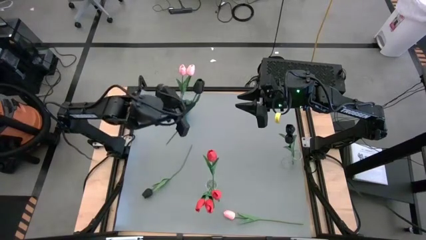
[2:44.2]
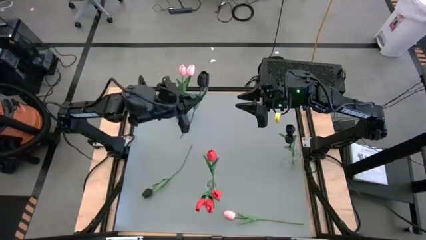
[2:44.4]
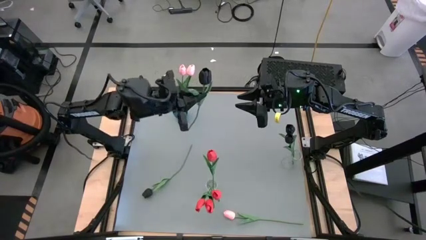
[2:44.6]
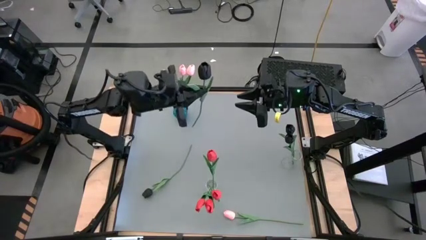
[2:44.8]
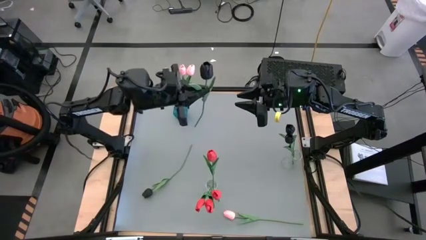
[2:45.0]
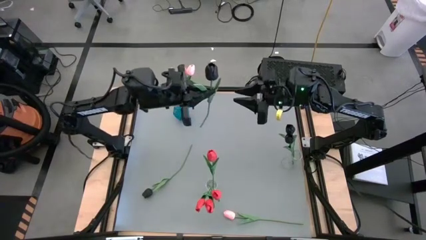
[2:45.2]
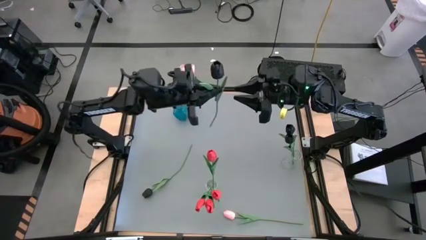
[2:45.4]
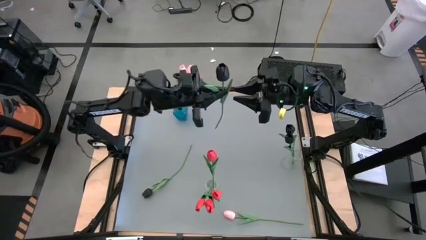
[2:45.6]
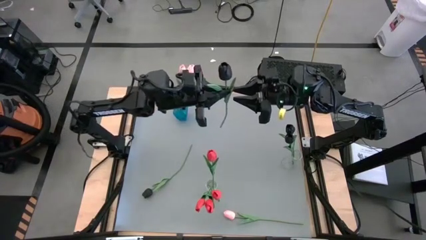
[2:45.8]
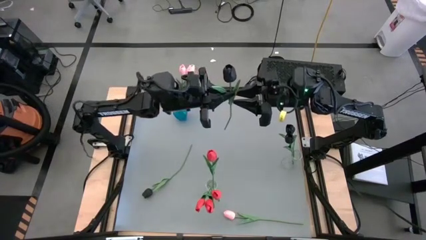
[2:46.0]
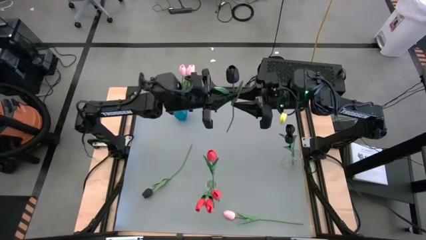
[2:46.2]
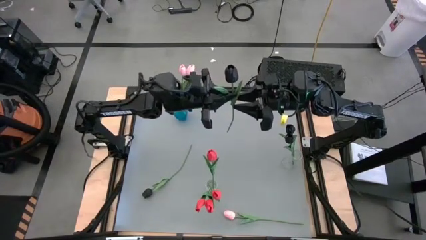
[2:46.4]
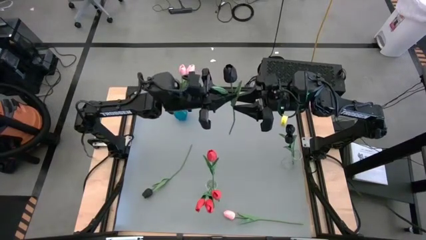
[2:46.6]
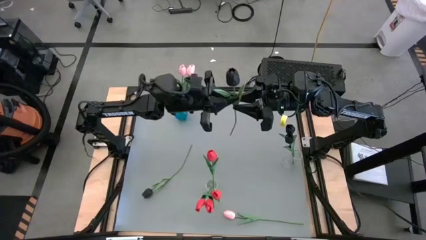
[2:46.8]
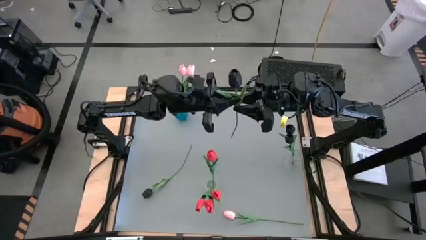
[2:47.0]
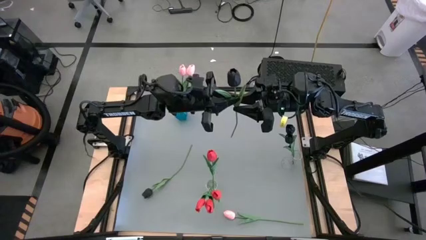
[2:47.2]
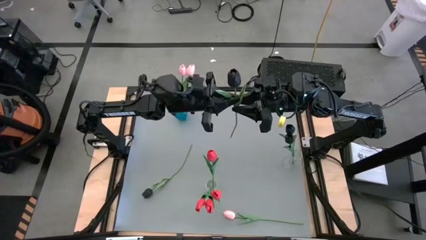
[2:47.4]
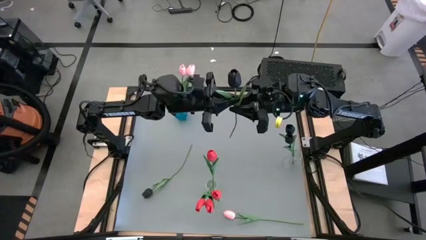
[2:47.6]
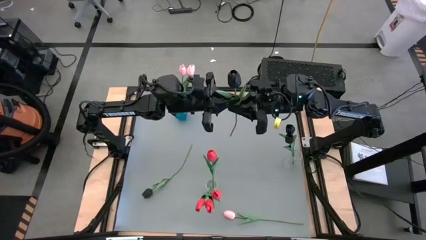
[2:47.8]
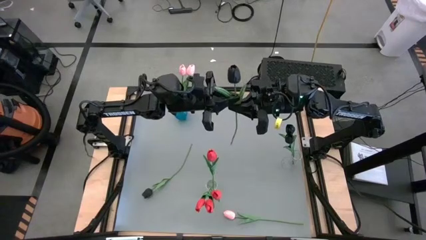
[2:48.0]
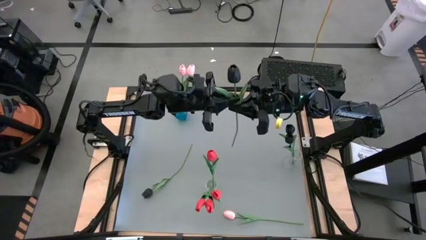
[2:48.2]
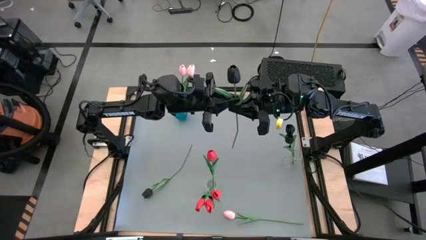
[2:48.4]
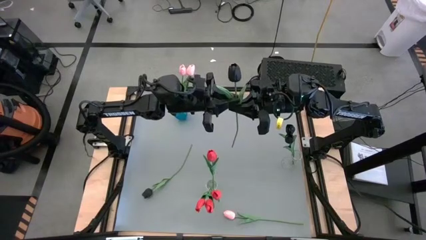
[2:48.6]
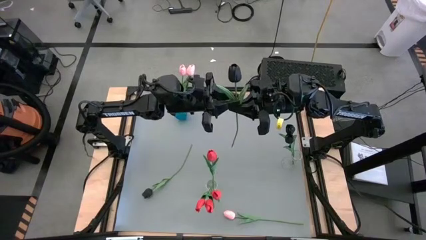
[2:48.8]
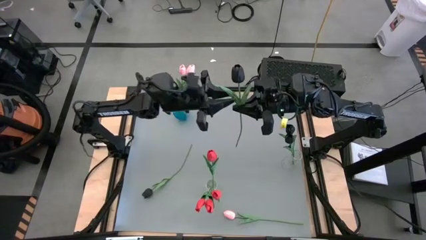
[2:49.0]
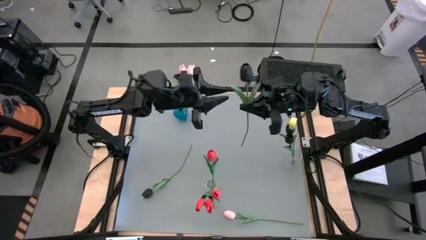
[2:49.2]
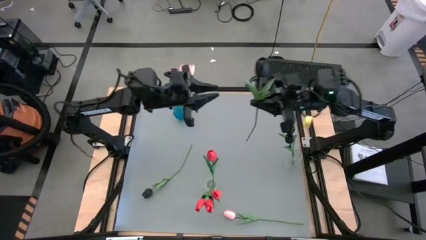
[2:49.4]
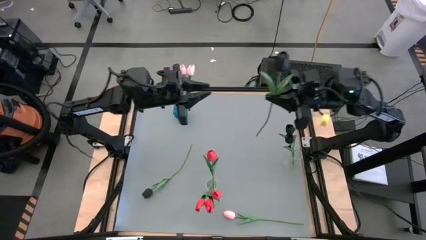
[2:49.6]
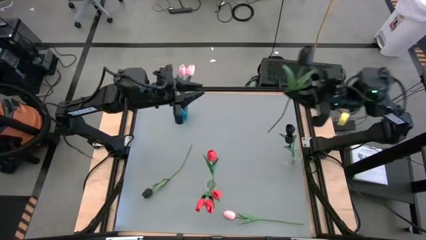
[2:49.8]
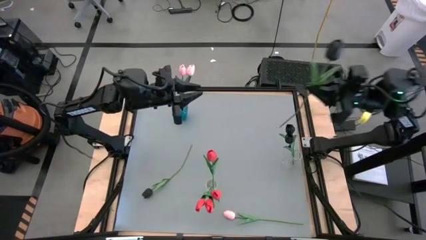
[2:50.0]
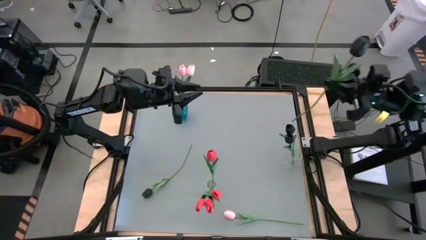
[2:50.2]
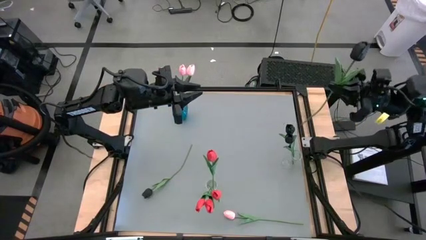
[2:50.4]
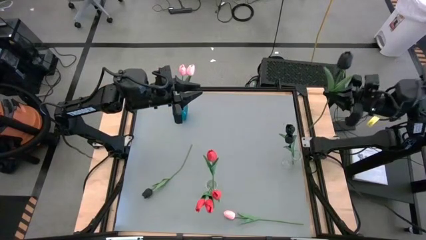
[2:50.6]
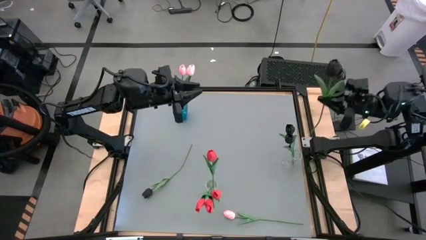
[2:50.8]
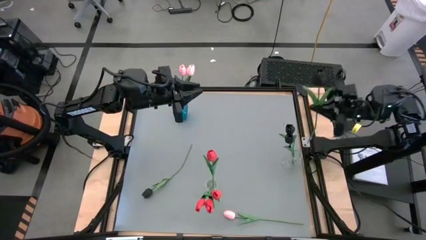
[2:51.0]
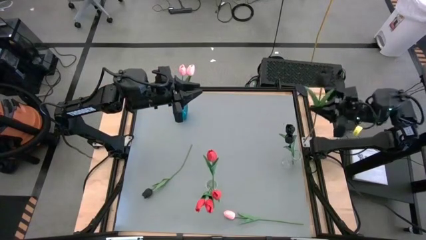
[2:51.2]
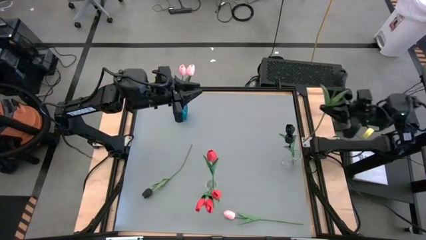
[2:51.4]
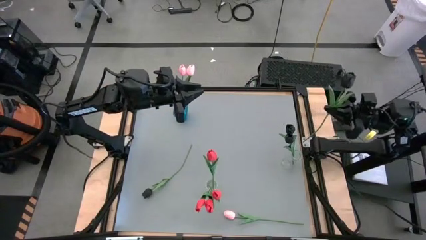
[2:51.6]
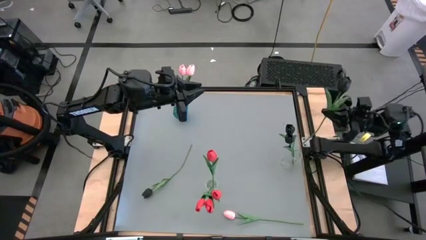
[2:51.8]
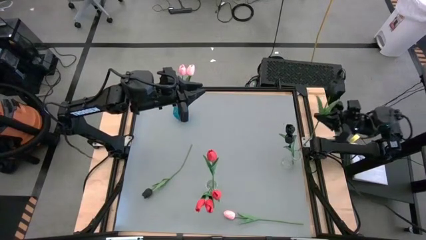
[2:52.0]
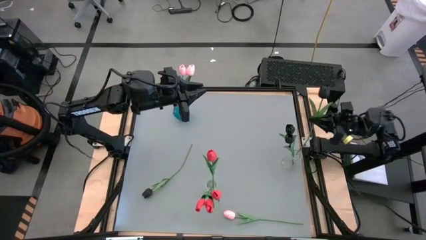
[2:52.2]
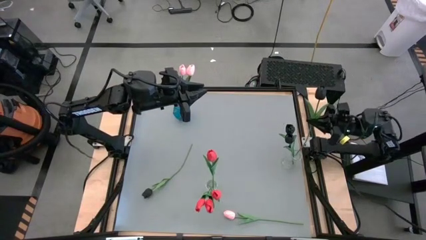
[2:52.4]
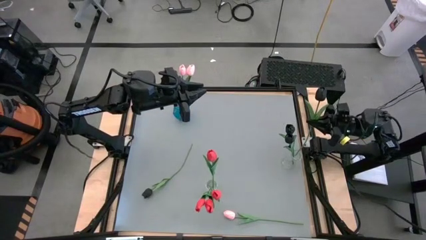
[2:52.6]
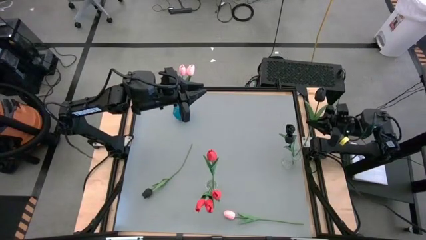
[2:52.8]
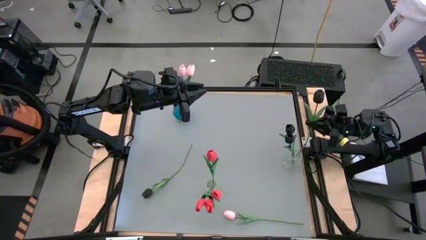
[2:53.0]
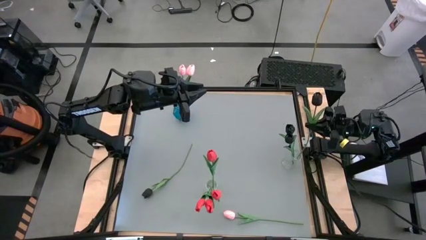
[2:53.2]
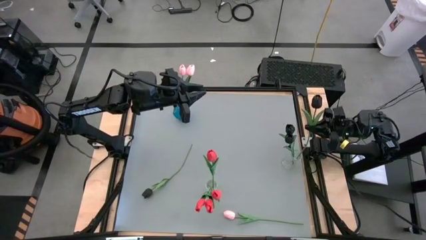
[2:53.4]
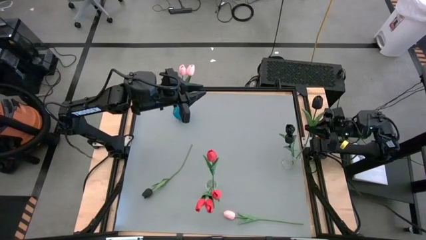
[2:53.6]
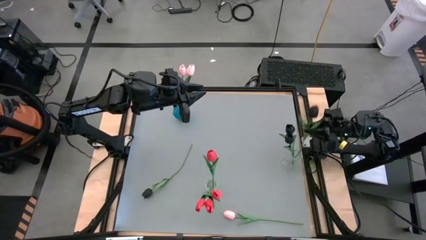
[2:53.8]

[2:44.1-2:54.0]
Task: Sort flowers into vase by color
Put the black flower into the right transparent vase

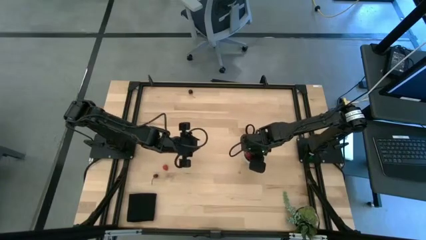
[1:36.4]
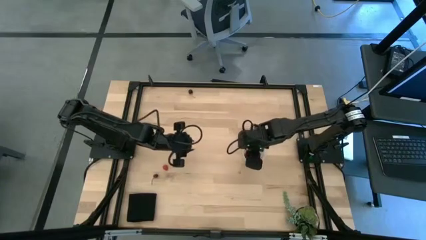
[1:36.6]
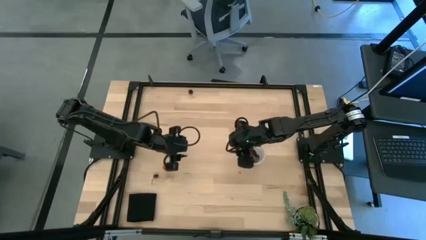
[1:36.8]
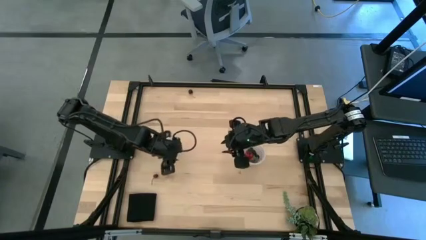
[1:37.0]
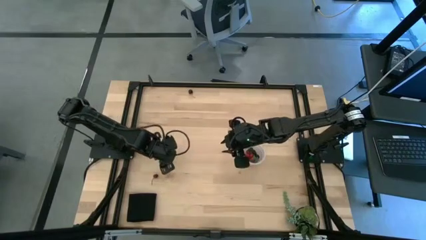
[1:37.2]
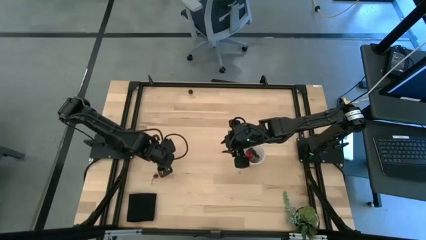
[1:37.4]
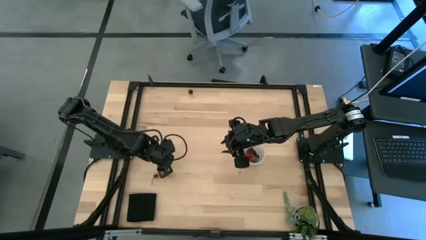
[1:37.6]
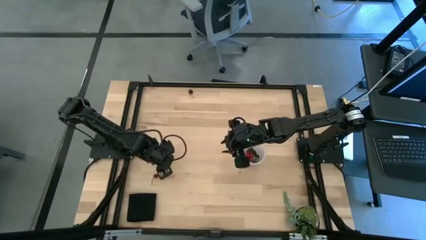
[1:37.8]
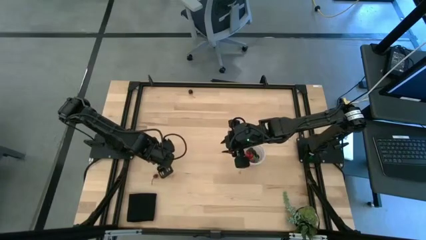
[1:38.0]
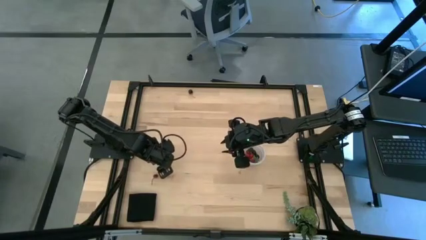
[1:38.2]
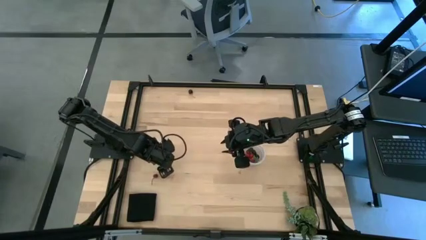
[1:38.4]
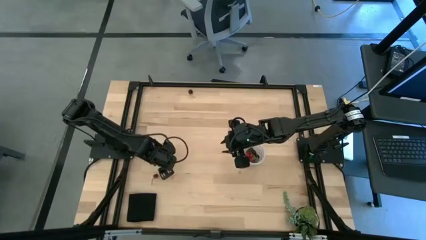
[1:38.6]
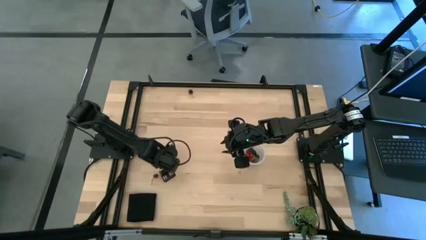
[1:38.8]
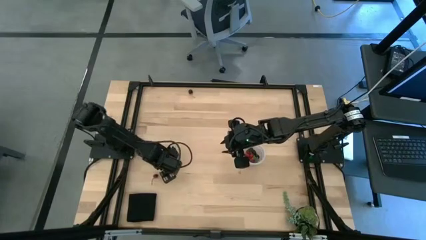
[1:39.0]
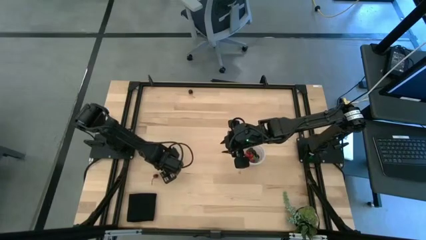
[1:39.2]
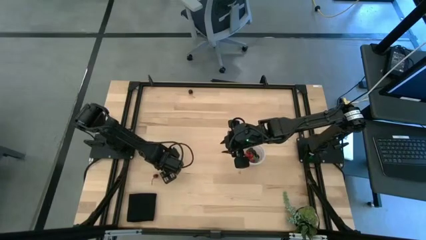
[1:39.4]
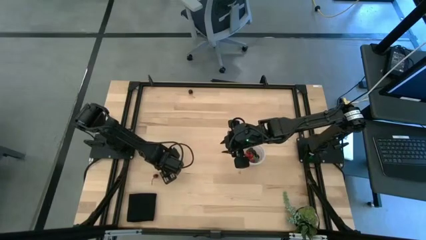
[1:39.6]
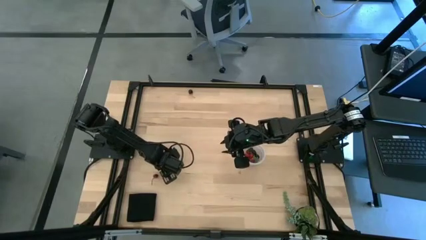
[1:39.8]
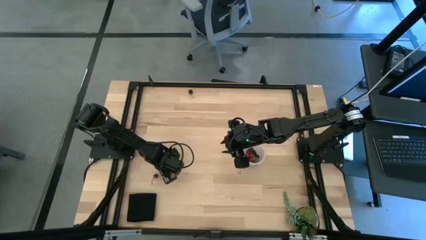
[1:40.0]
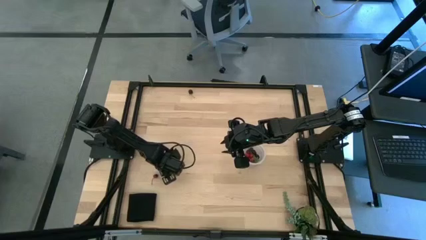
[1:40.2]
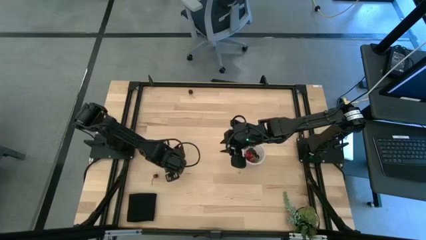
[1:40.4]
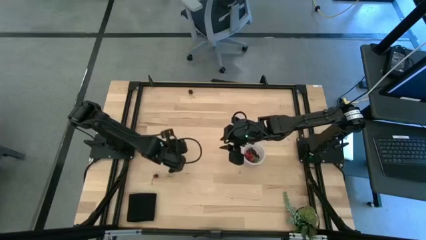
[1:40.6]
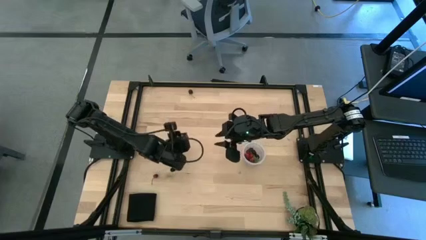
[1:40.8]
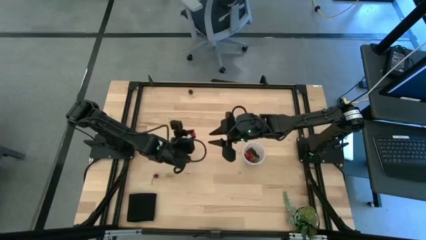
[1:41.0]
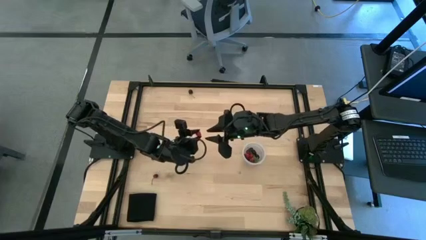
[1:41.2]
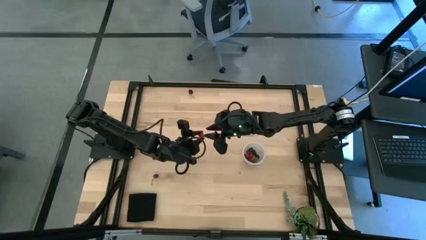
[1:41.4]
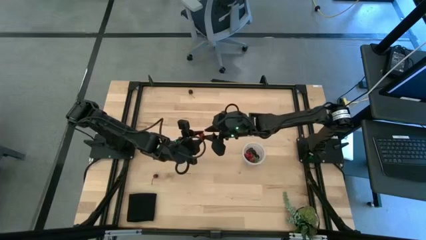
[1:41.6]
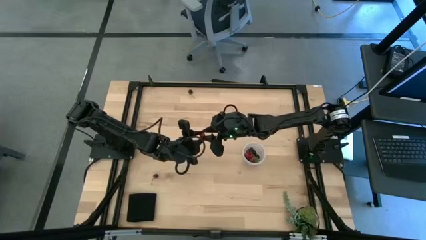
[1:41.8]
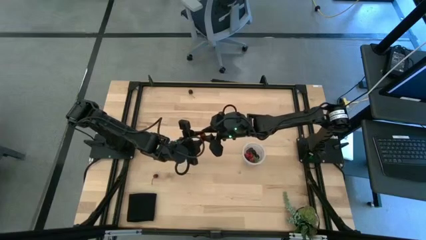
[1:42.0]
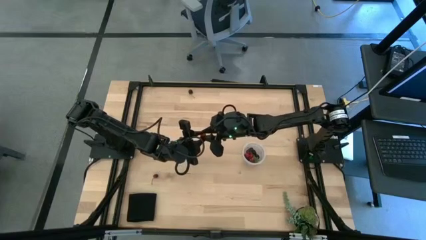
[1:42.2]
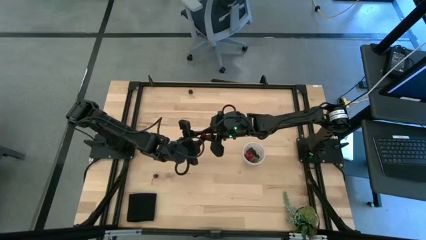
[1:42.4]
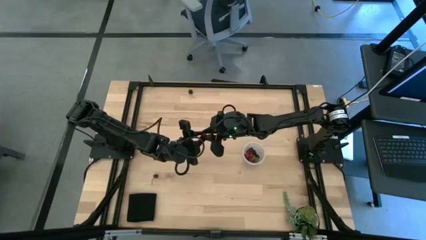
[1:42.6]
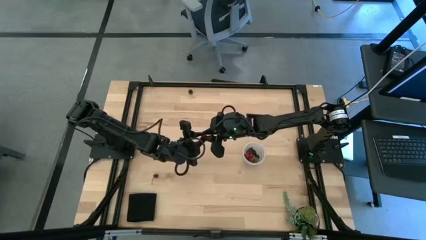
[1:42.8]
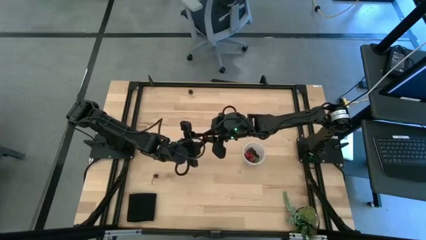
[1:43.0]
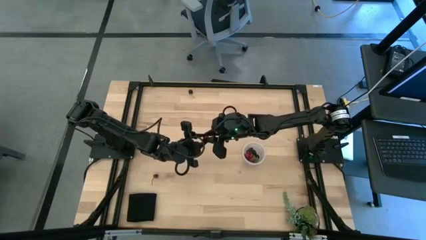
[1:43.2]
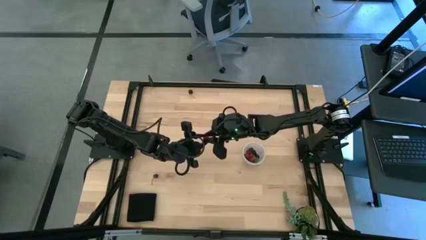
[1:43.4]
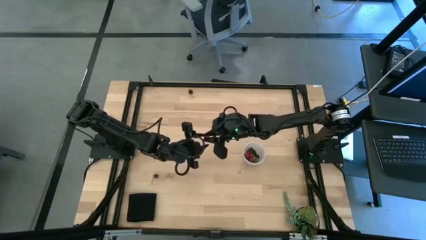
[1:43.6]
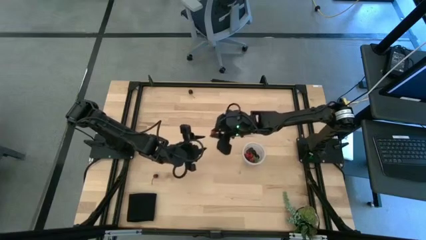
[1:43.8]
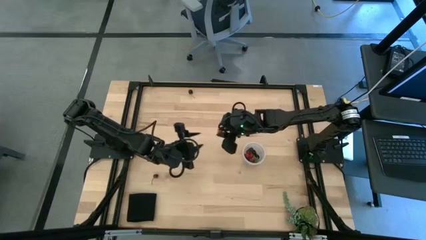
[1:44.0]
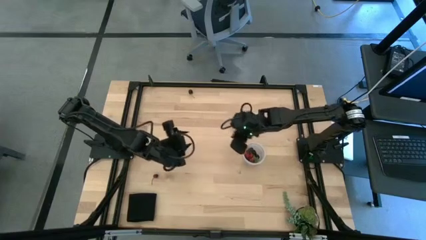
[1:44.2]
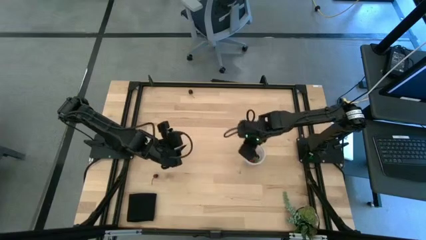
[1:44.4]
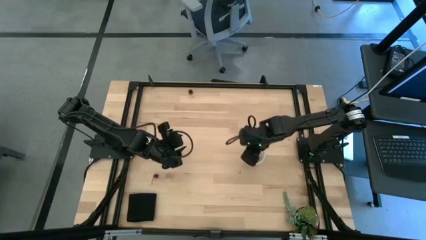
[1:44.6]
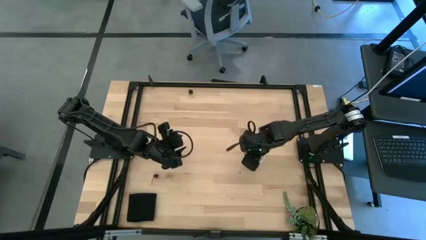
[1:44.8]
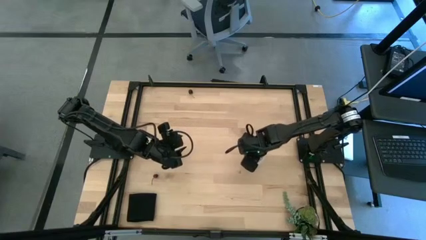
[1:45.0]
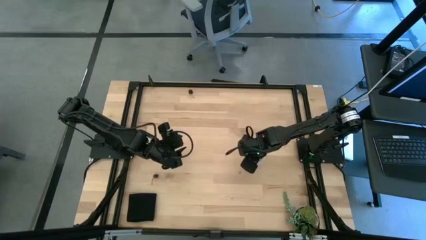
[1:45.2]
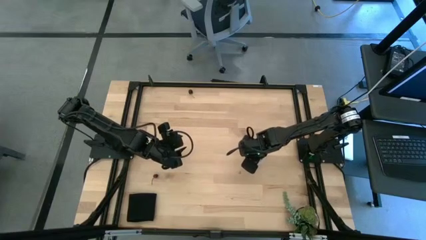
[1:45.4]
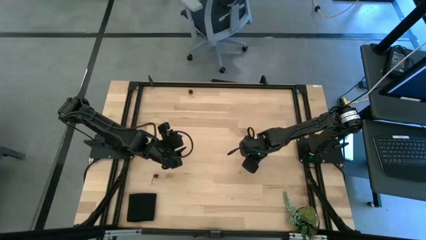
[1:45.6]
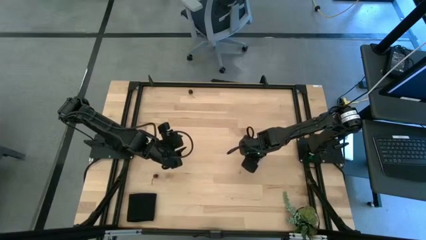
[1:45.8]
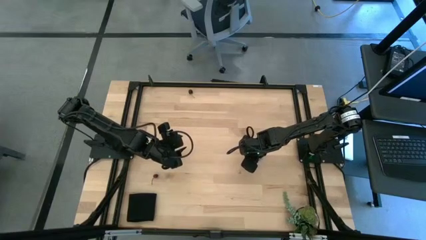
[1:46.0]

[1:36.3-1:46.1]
Task: Pick and placing Produce into tupperware
Put the red raspberry into the transparent bucket
